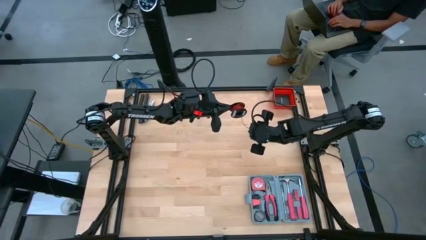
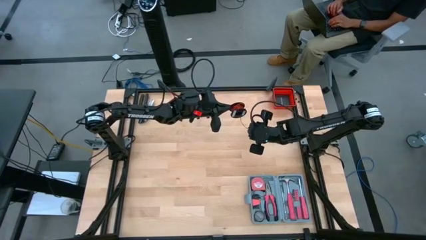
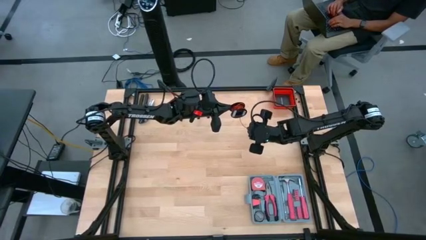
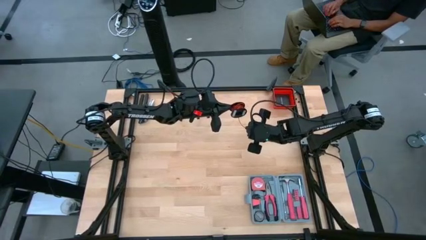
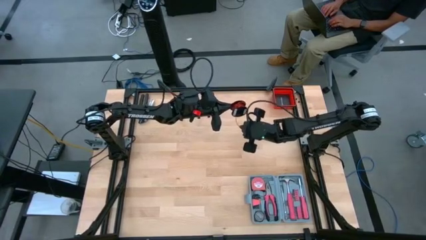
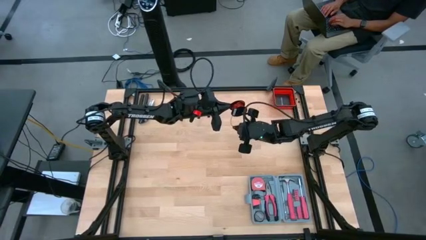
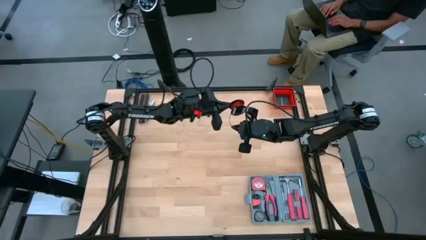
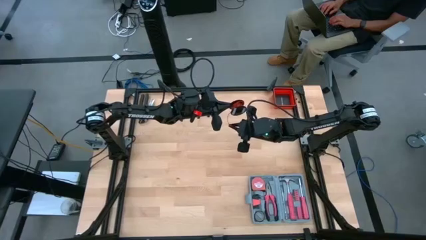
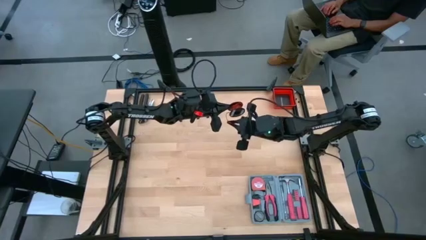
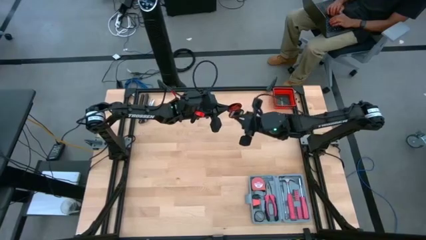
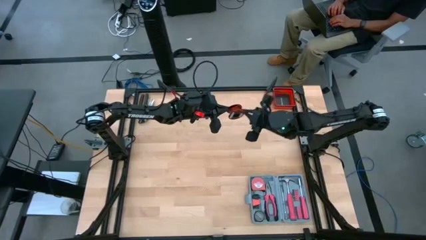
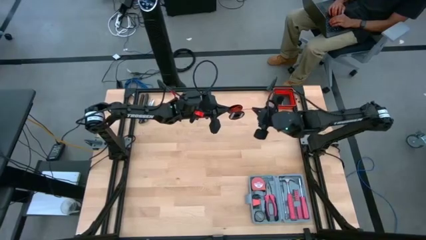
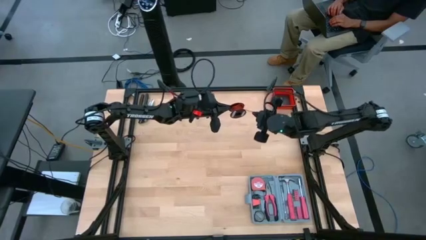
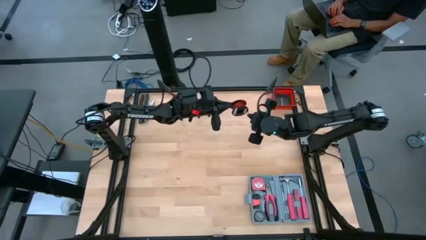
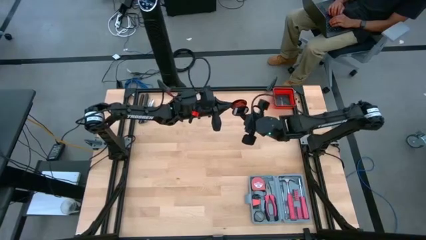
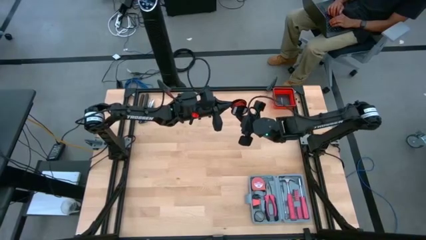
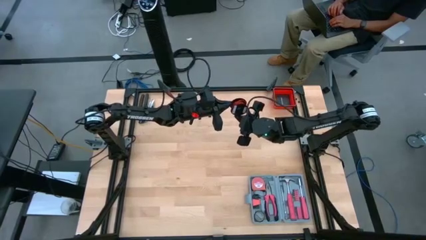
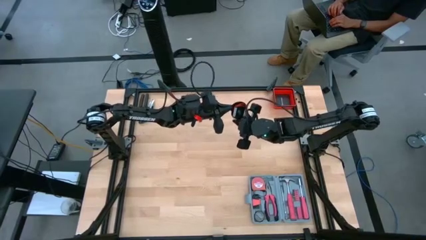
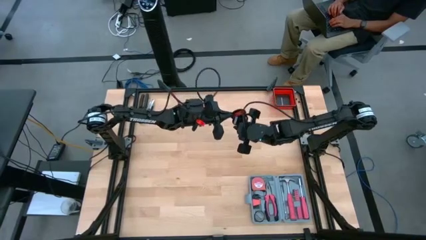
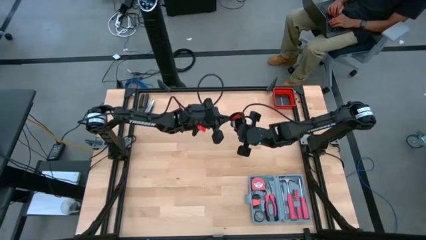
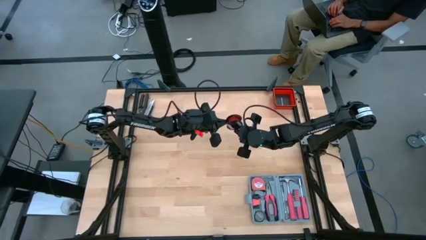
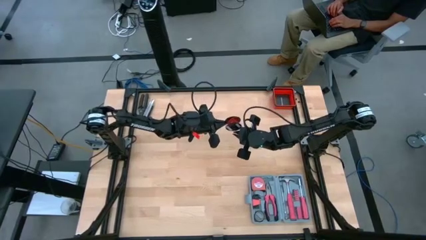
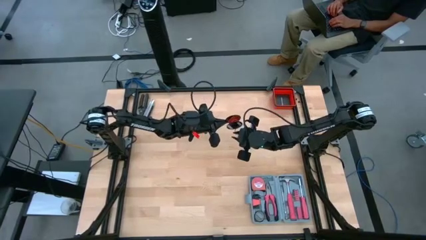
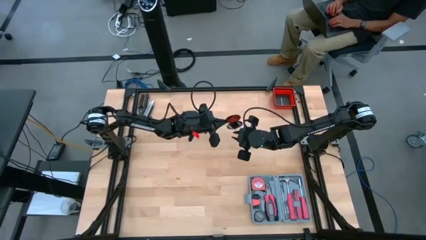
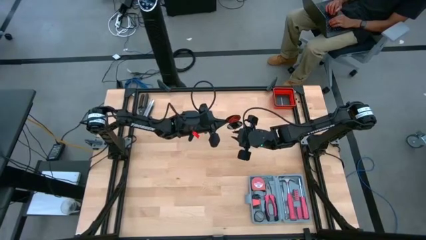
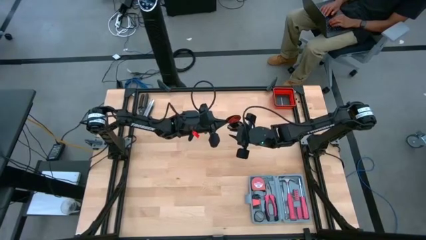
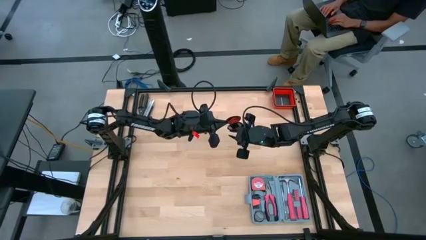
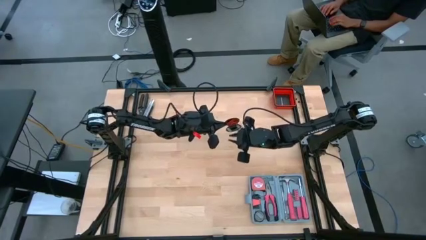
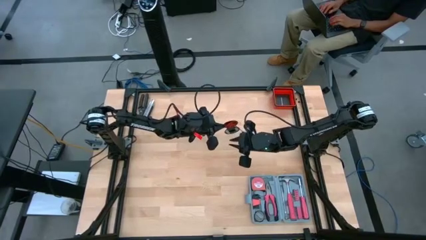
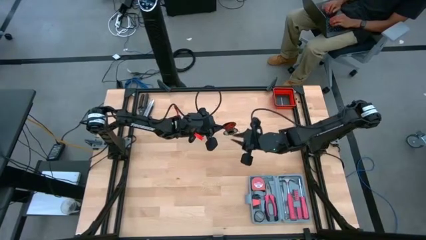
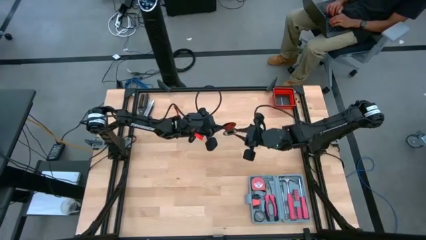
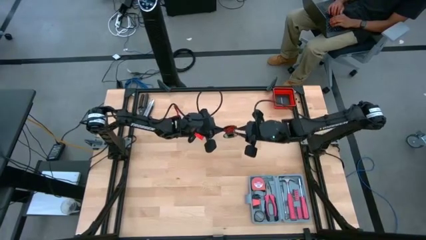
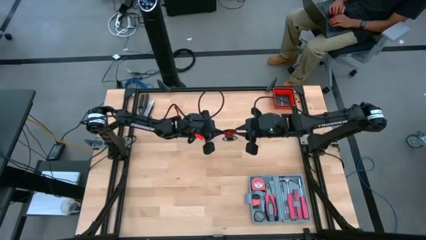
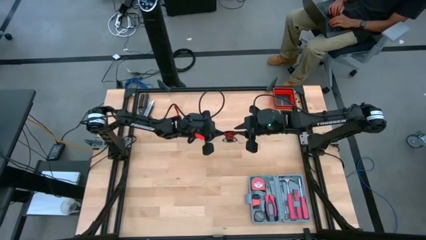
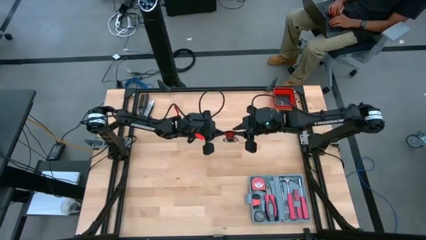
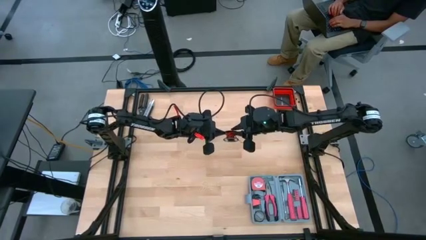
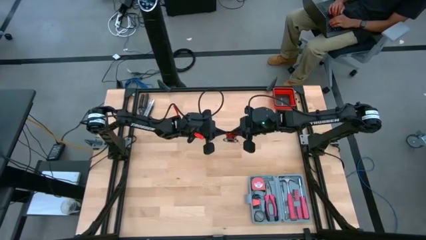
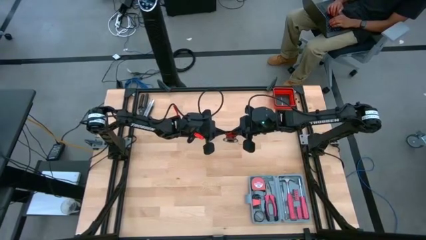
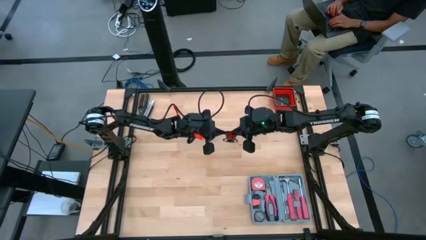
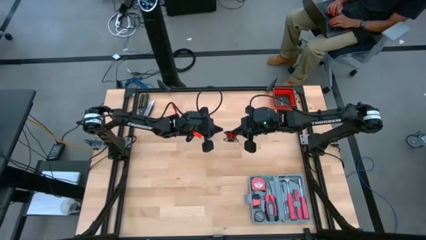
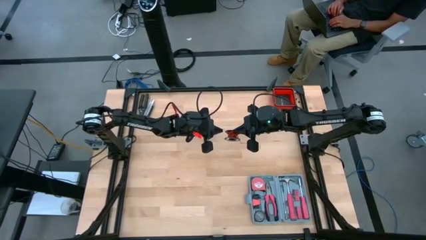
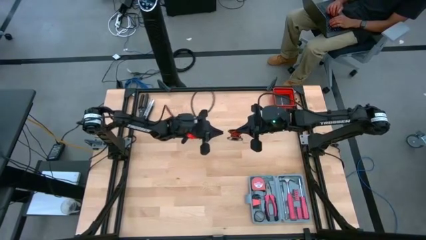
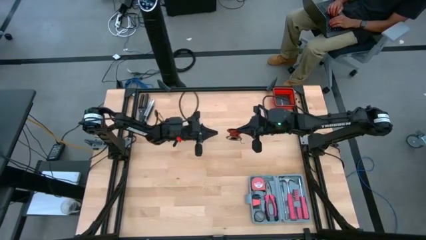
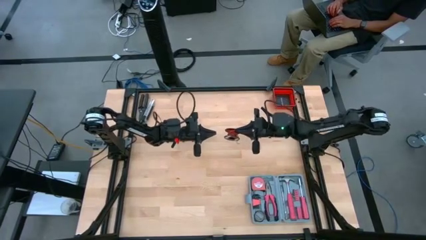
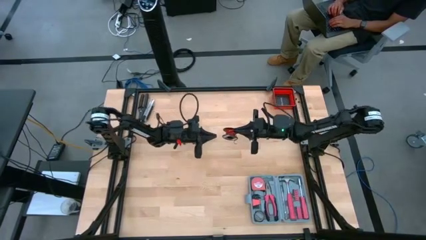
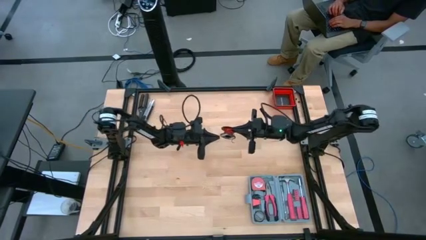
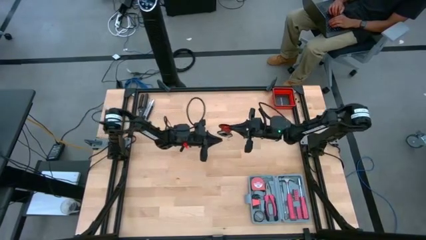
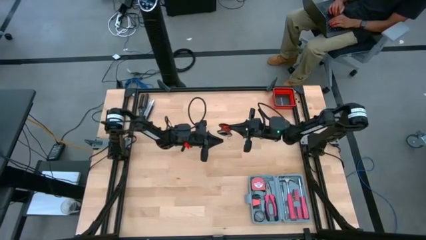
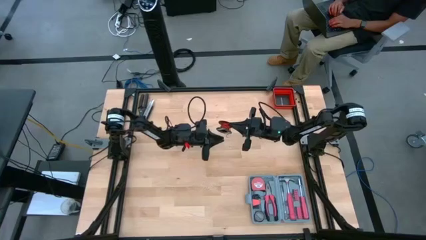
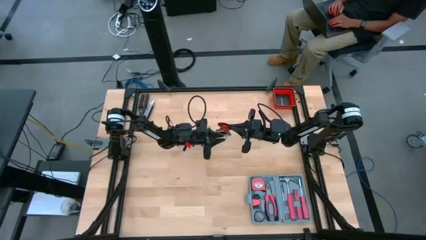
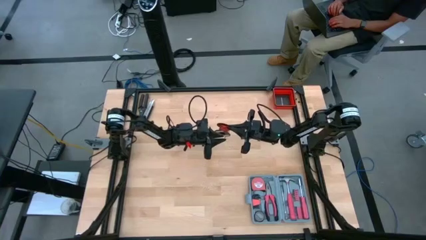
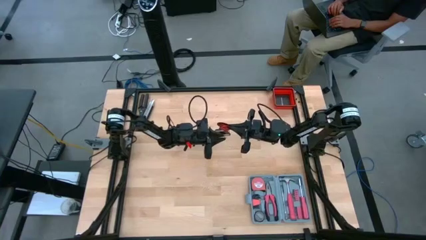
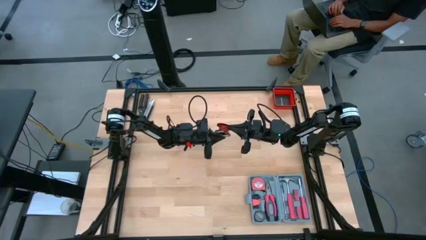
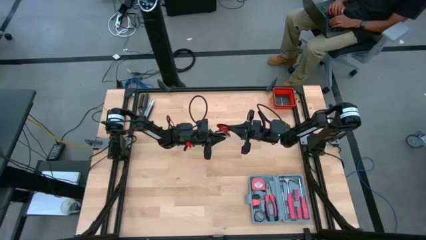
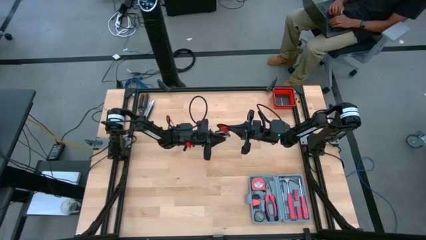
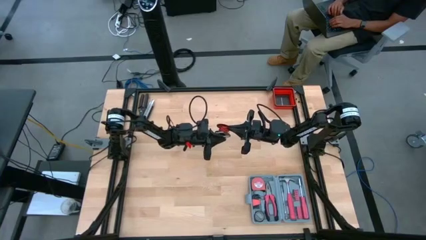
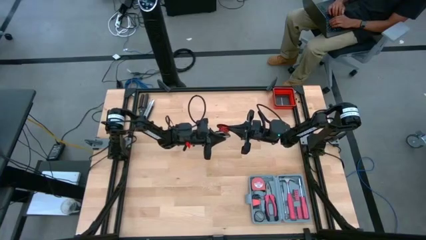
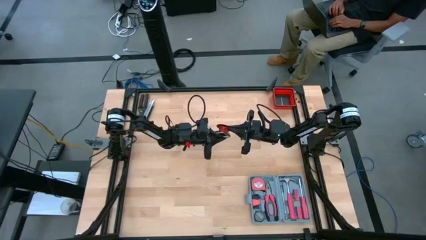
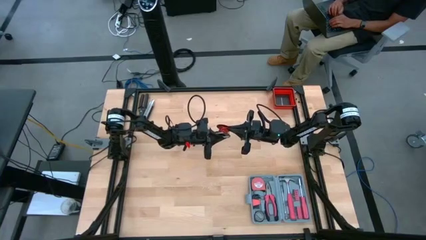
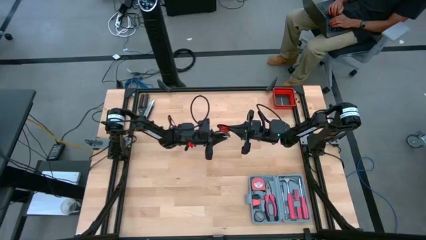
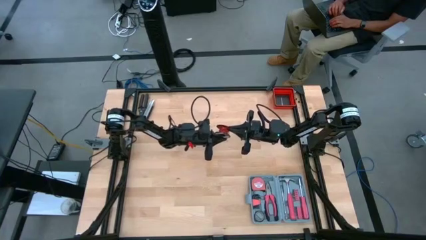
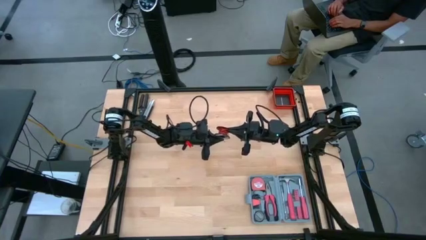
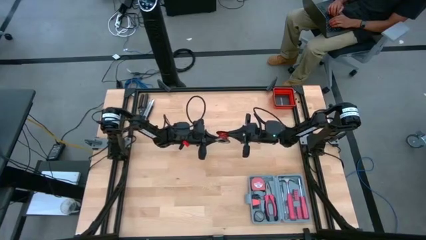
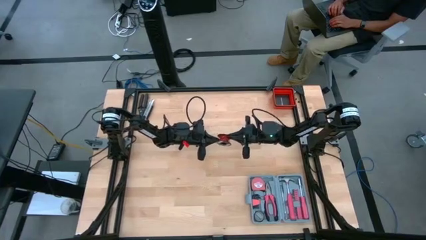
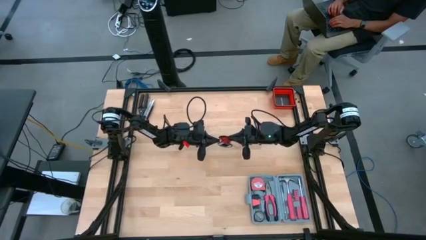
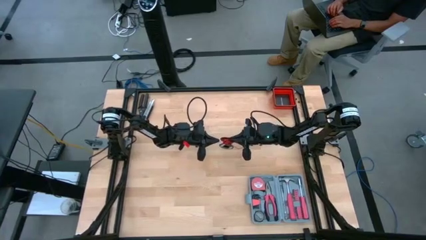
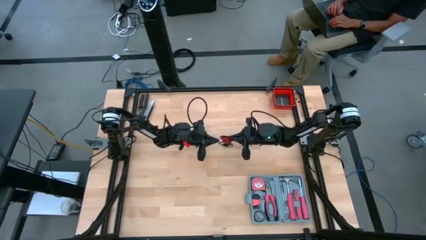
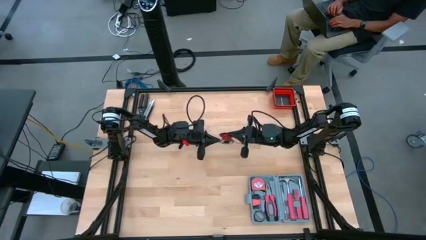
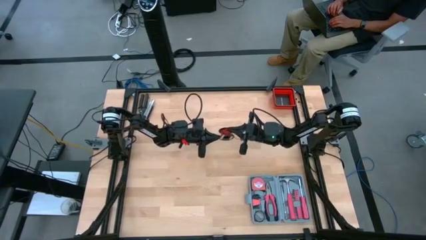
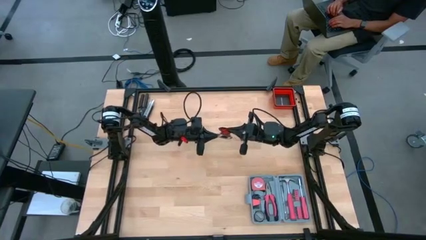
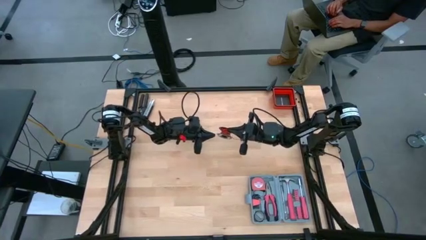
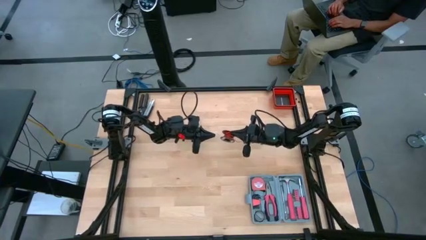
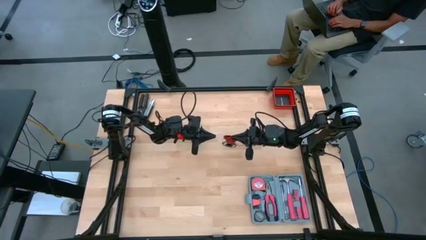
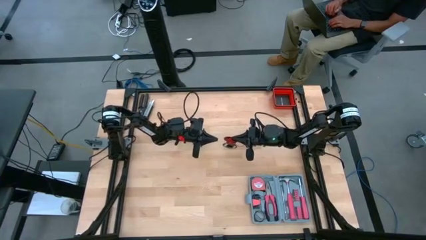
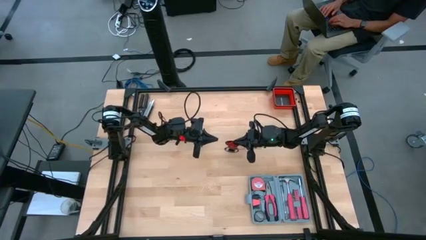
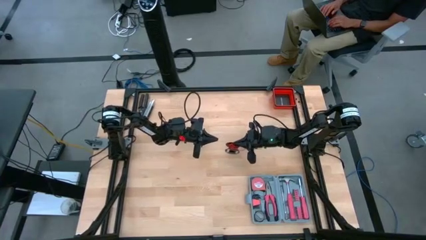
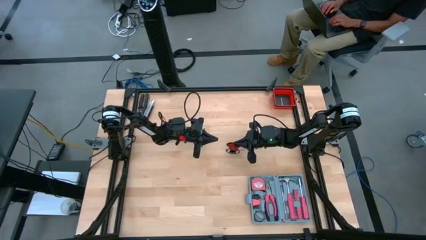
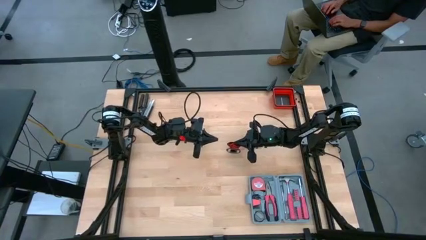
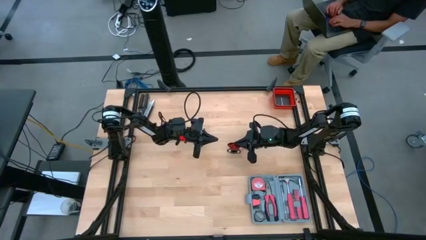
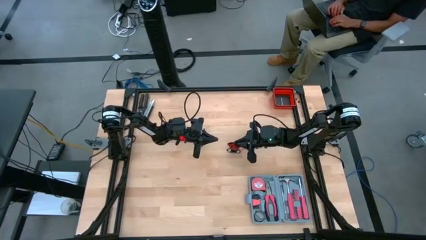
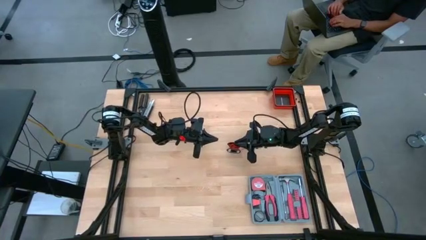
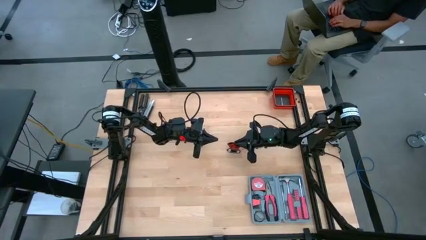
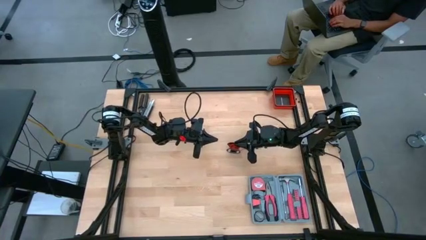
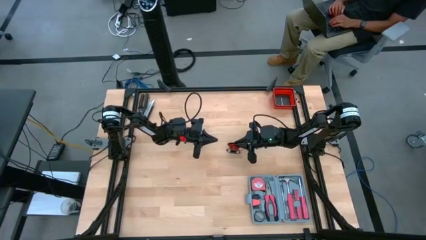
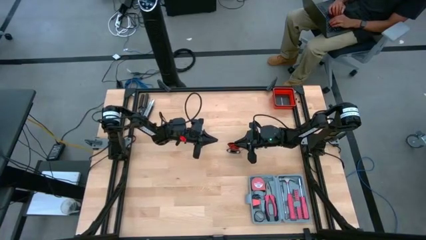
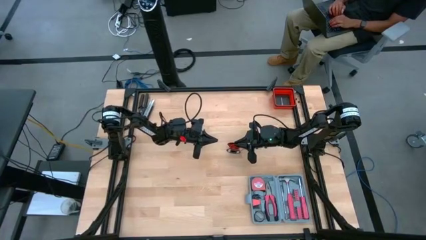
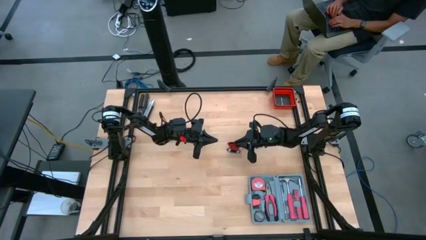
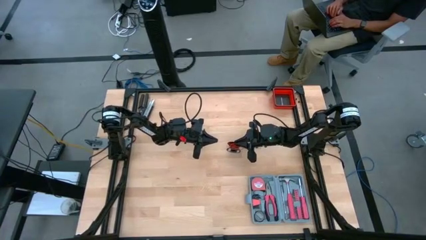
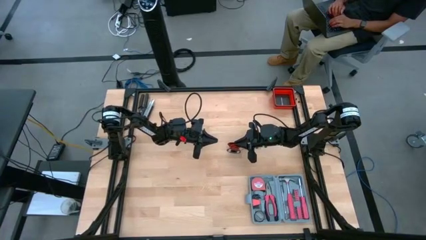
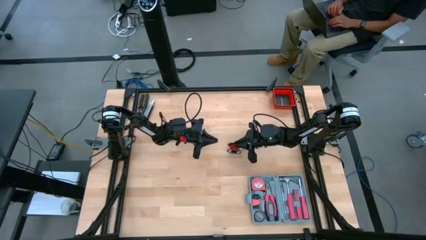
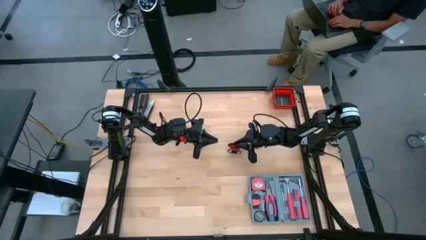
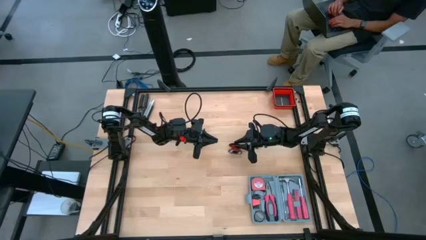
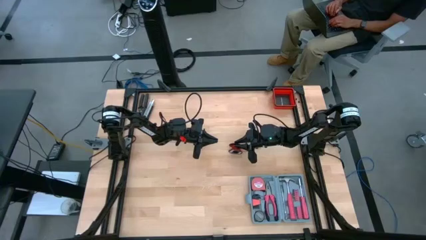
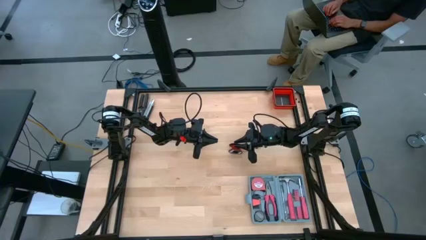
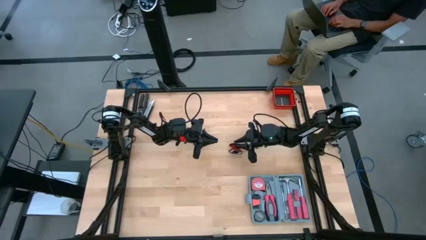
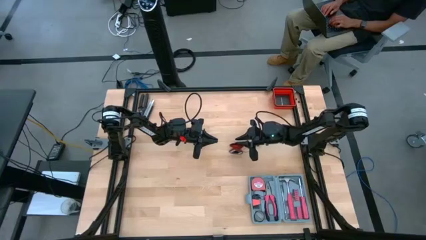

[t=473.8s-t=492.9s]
Task: Coil cords
Coil the wire
